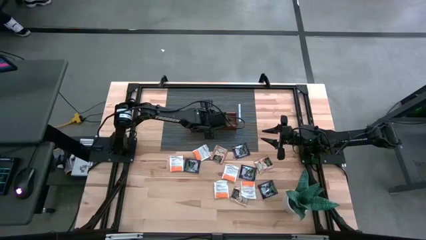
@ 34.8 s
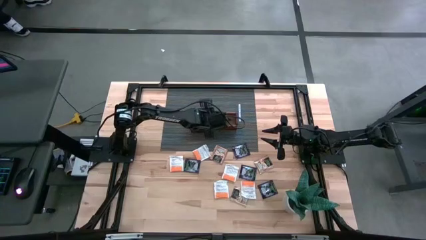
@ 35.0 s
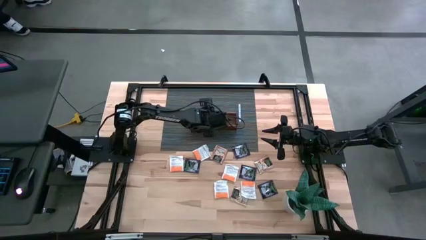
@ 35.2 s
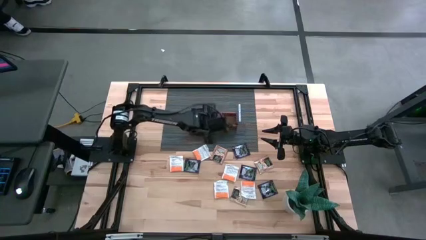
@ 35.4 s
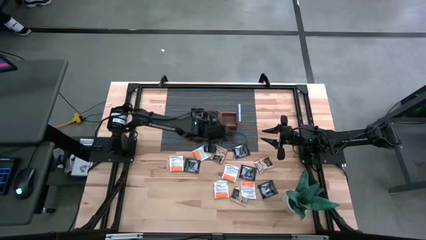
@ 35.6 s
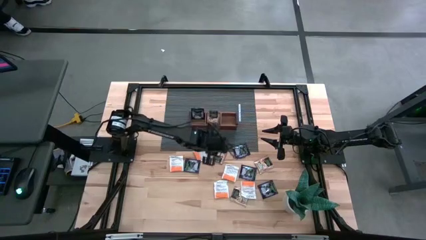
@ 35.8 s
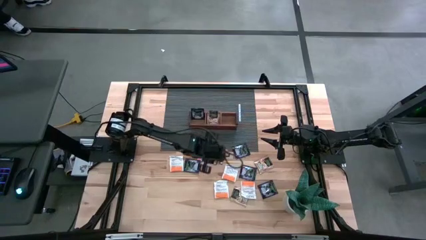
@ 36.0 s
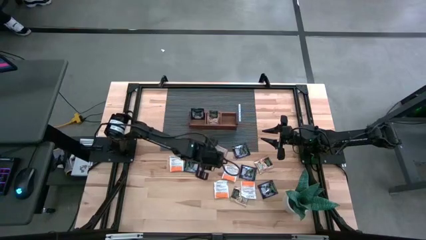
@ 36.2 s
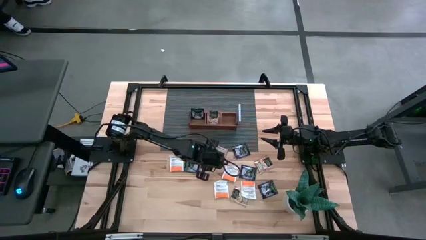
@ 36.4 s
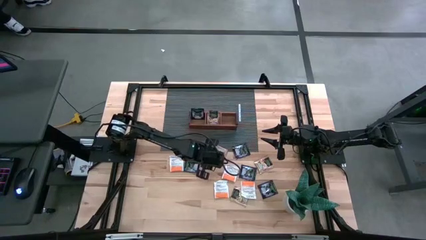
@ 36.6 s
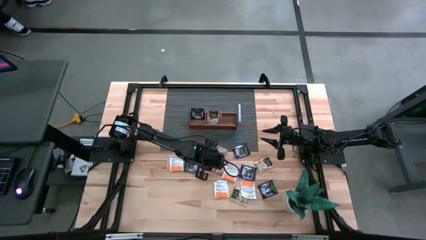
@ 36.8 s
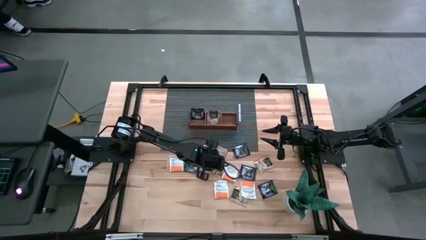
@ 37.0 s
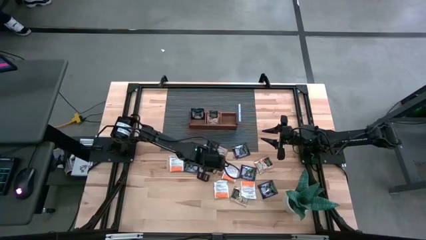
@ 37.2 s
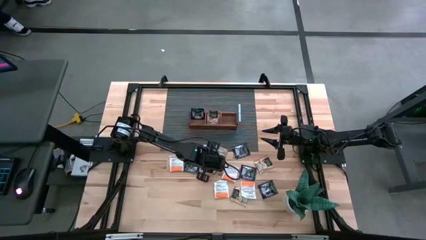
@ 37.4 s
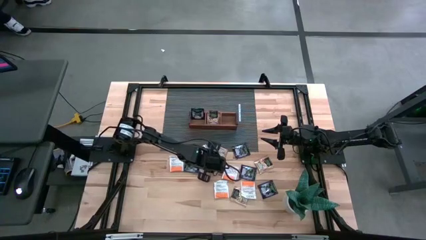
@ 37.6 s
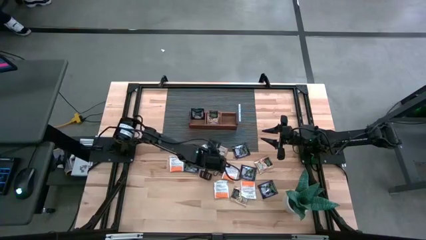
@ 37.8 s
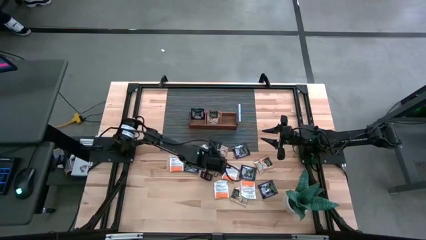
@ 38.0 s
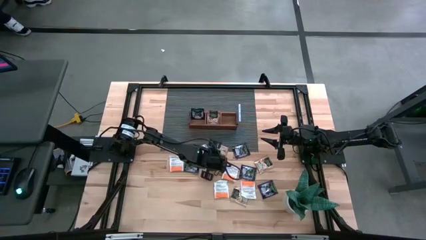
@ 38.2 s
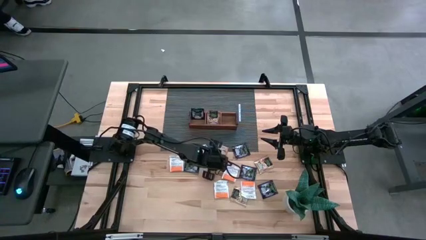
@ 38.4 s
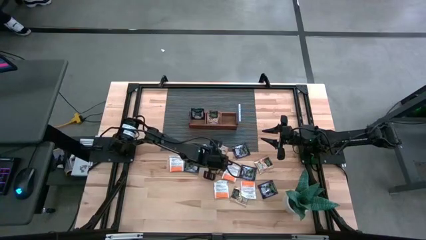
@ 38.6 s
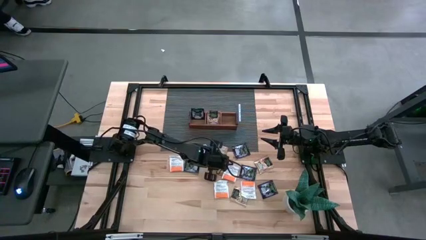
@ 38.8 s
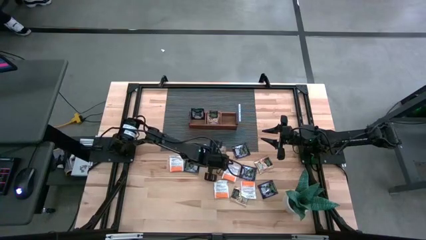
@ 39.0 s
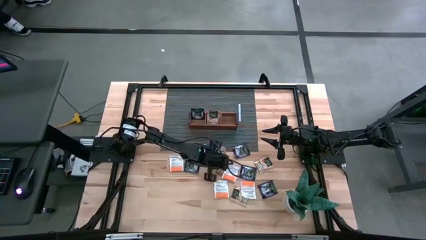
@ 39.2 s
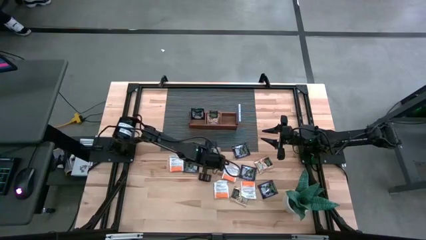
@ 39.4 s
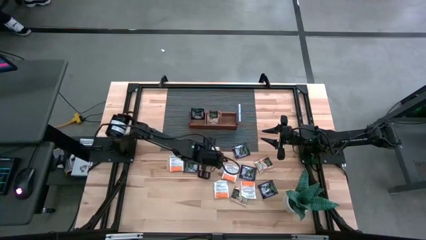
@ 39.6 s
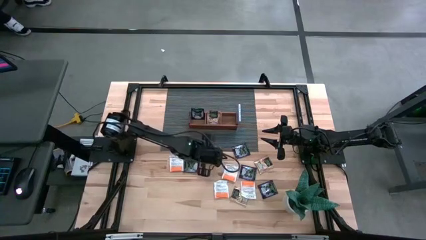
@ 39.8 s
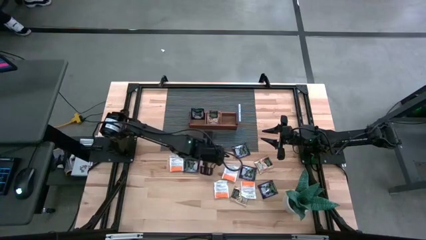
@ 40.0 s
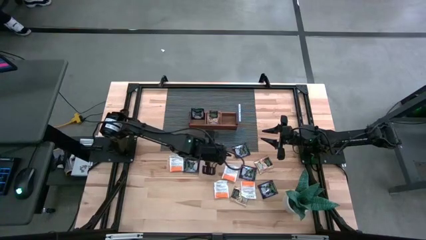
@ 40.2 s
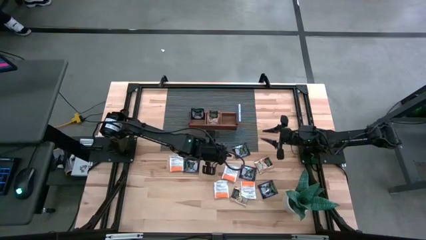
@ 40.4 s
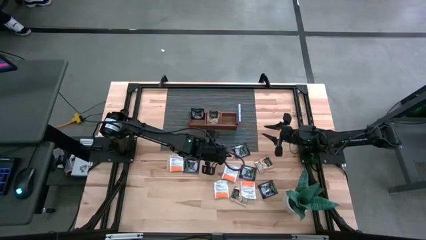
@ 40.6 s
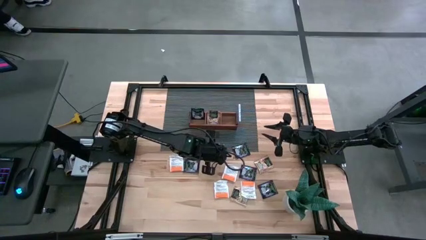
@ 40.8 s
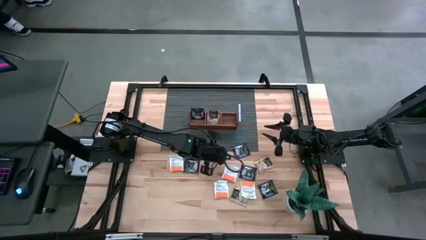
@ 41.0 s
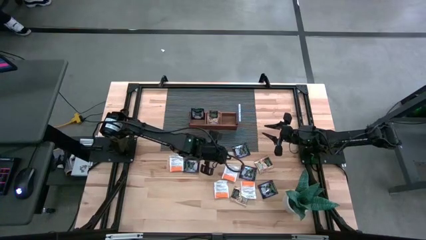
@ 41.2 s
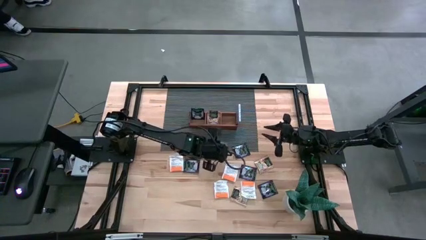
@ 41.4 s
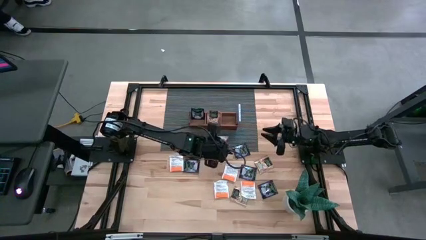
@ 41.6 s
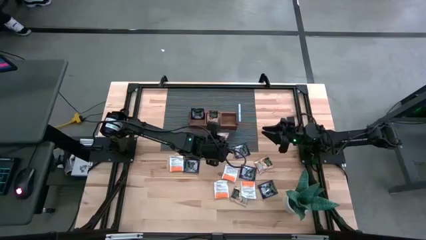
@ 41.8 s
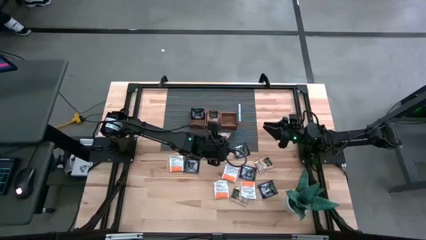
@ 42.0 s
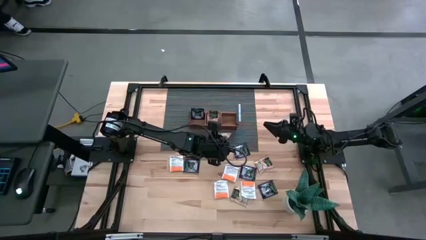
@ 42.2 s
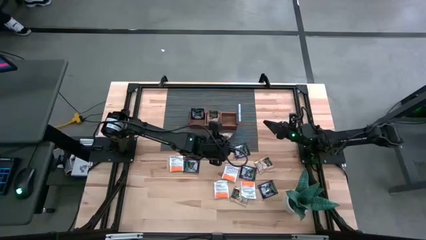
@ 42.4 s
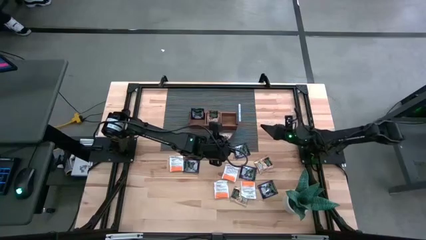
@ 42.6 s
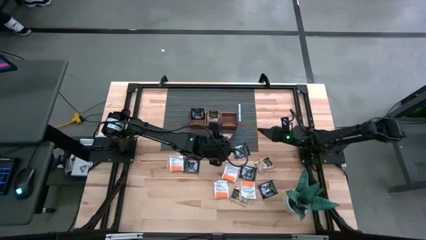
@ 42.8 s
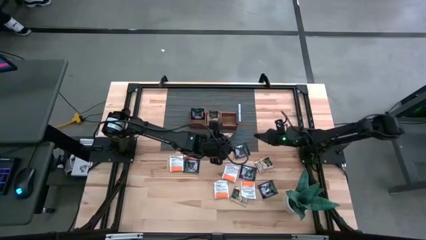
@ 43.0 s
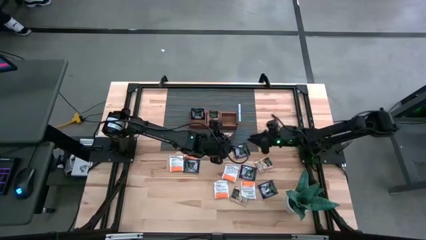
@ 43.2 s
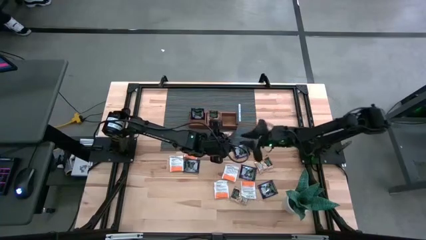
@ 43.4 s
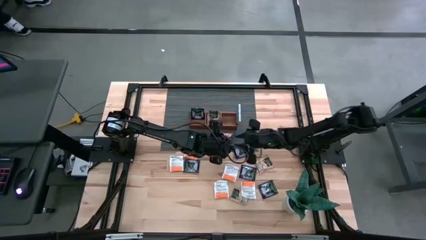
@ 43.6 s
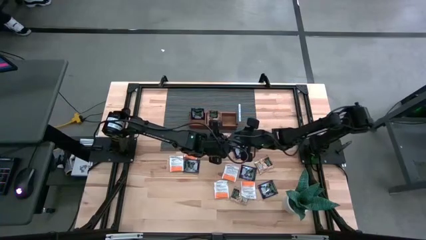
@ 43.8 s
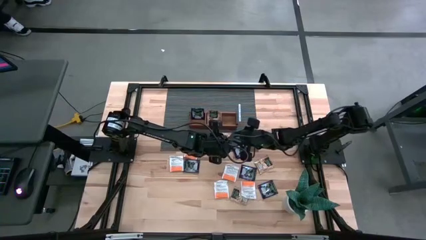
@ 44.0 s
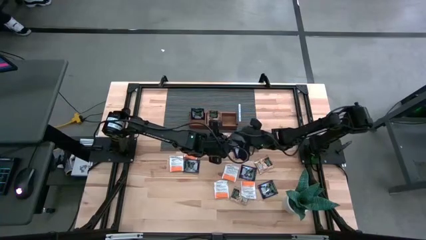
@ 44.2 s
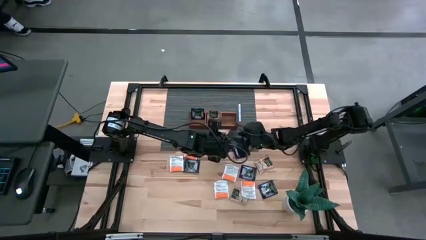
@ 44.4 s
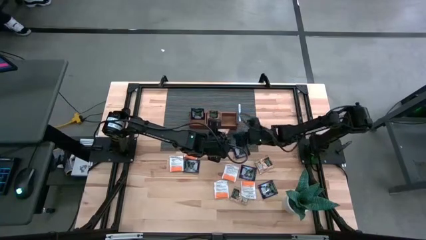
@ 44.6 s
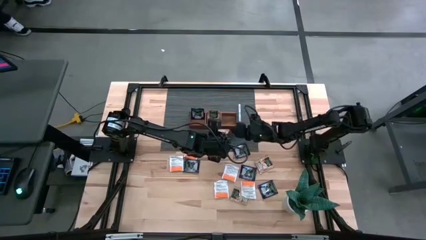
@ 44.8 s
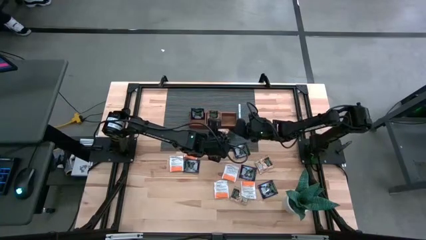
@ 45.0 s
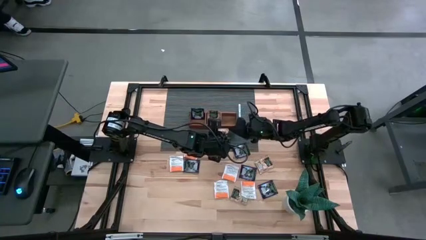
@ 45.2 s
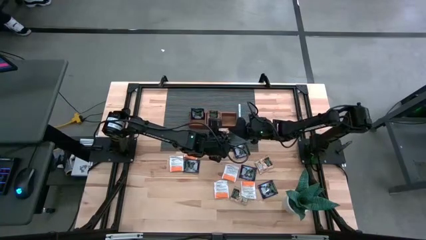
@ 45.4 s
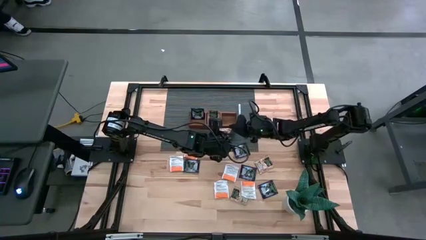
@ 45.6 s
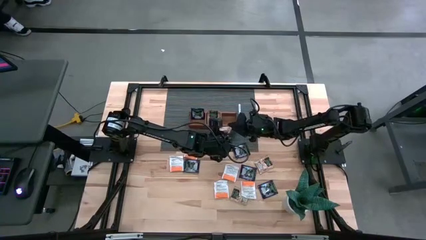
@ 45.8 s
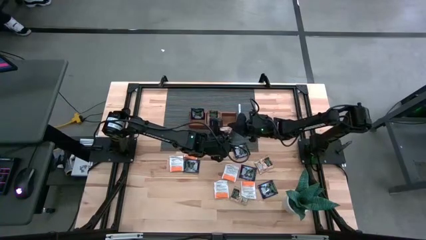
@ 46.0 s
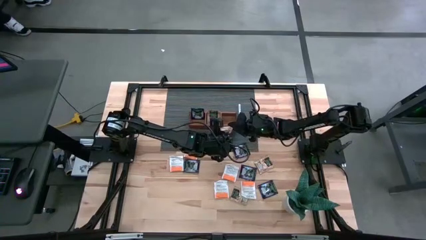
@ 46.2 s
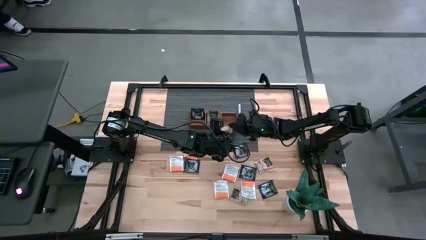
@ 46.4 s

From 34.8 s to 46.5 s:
Task: Pick & Place Tea
Put the brown tea bag into the middle section of the wooden organizer

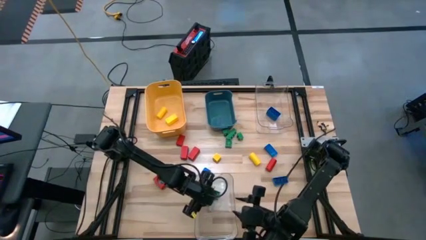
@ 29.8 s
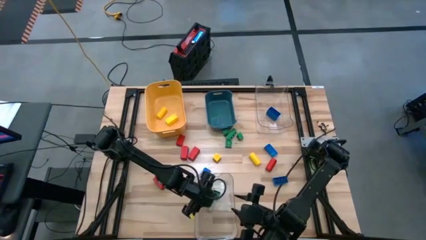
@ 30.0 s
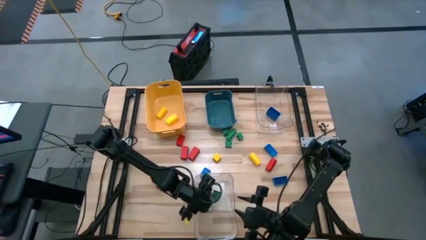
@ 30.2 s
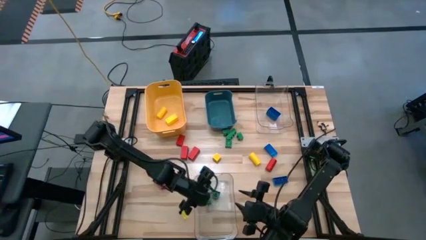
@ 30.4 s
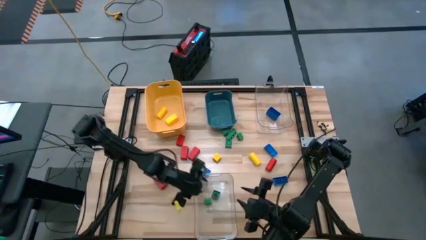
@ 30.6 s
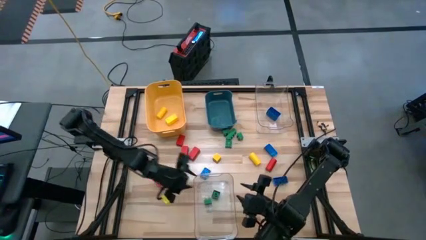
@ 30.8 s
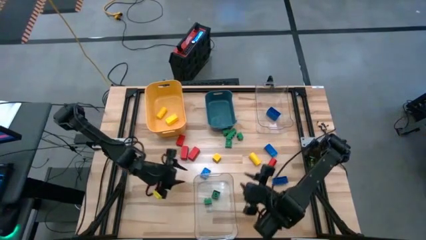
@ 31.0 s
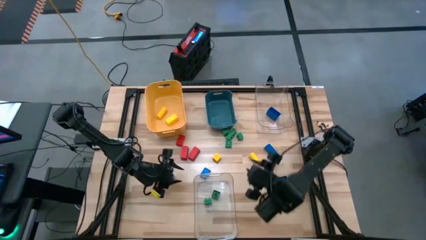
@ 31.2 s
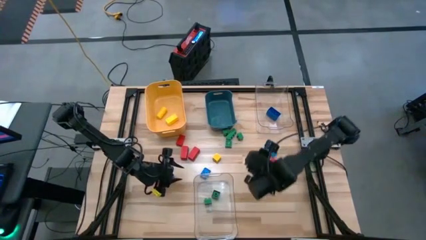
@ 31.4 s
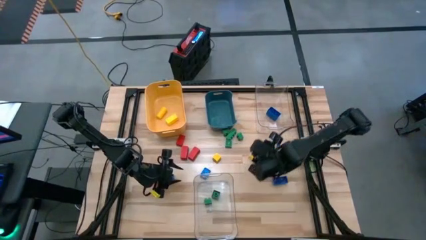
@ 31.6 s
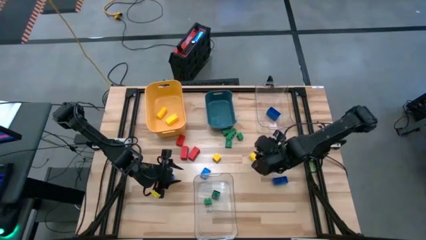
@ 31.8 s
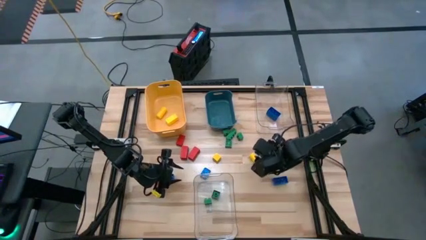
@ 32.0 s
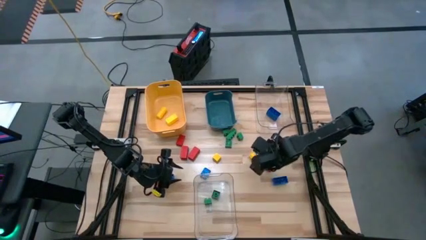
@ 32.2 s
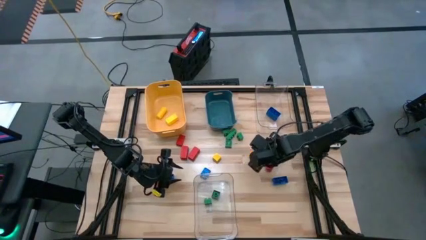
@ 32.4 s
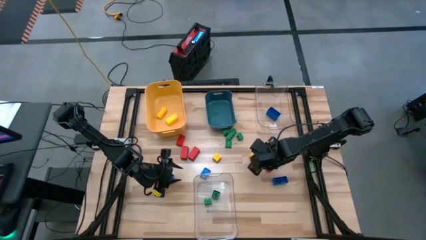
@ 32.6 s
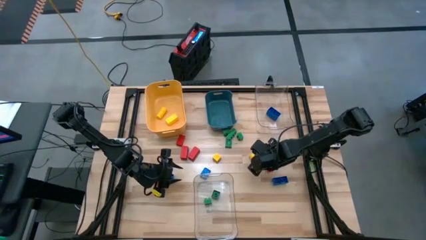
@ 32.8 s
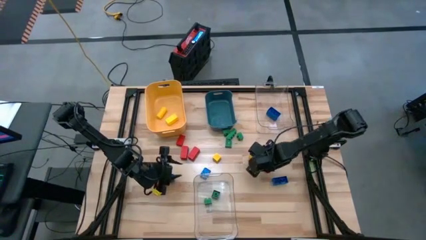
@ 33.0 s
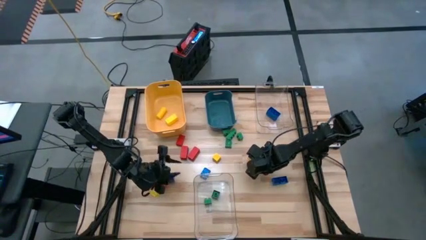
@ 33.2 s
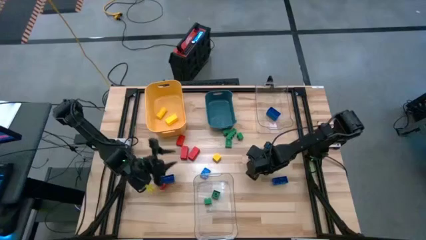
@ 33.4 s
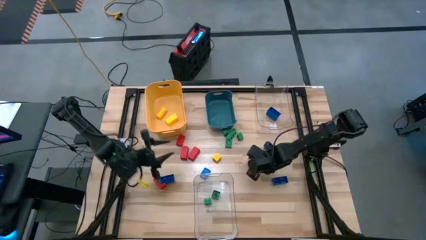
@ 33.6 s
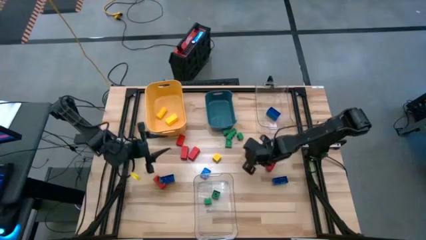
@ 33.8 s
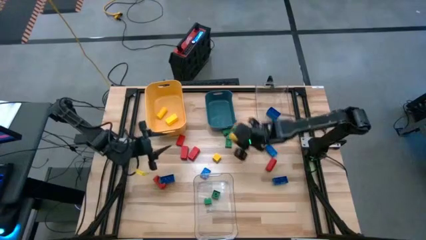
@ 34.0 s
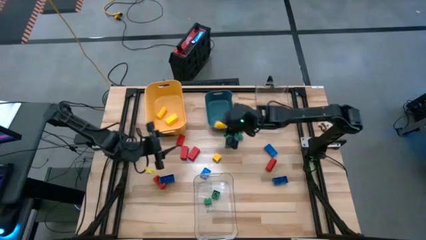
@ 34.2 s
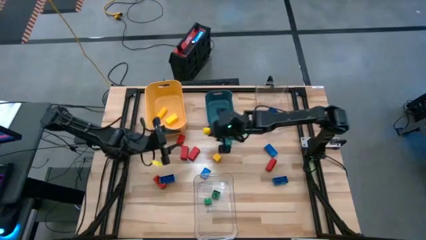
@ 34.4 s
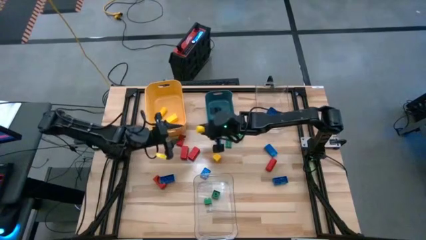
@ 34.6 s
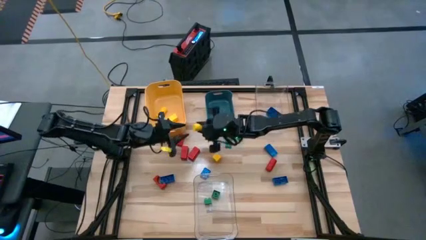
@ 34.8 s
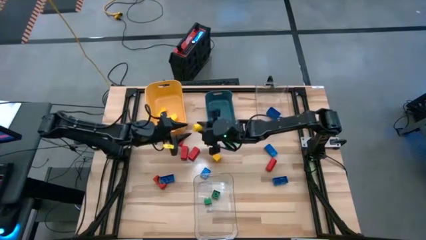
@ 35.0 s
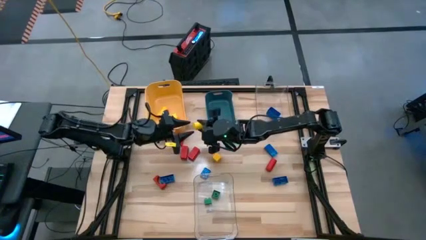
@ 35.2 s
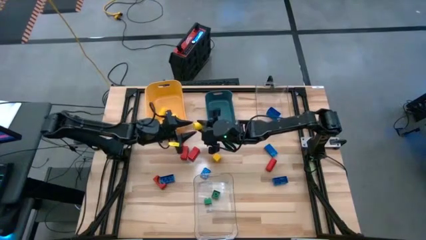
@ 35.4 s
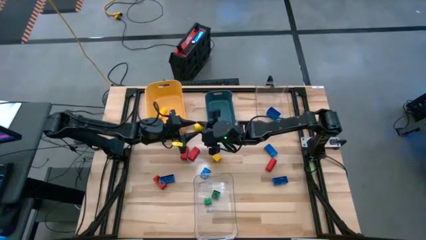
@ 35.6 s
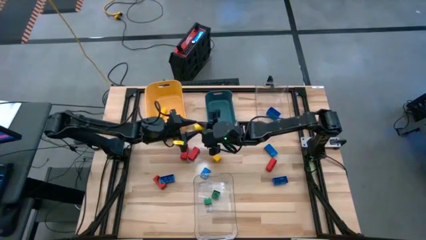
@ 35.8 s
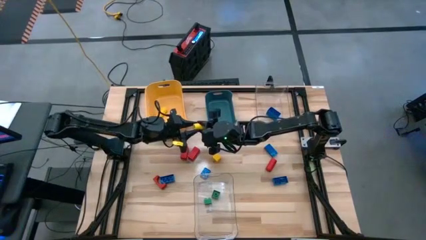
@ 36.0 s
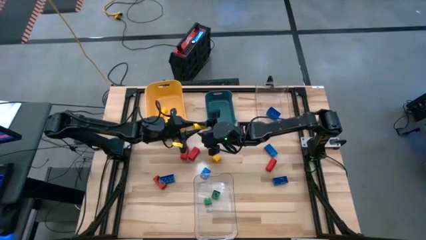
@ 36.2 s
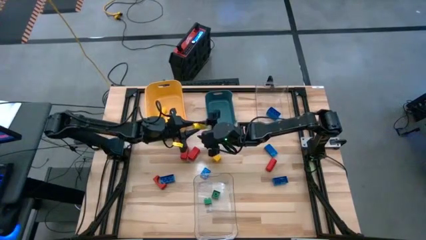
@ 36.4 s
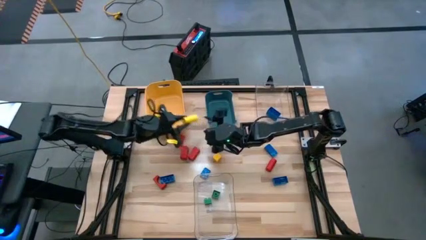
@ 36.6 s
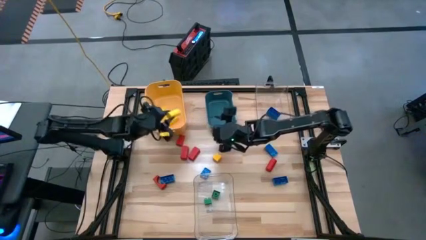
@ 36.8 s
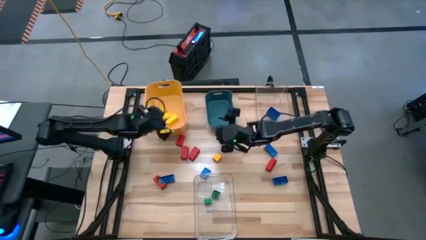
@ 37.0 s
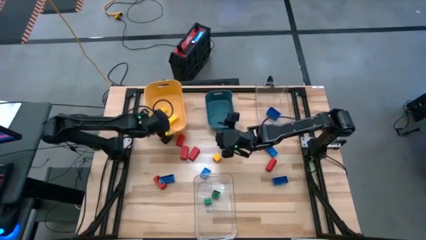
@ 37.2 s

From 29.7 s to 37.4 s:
Task: Sort blocks
Put the yellow wooden block into the yellow bin
